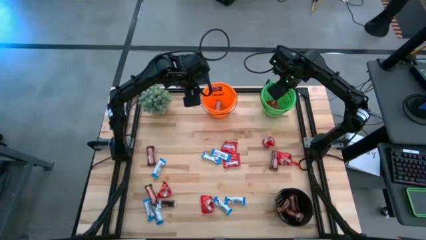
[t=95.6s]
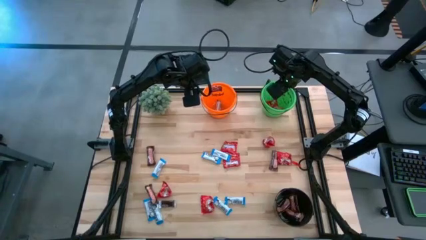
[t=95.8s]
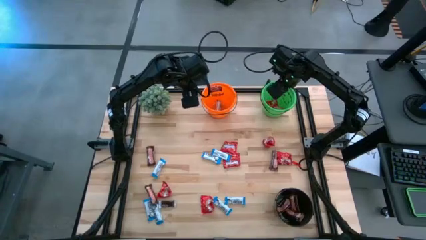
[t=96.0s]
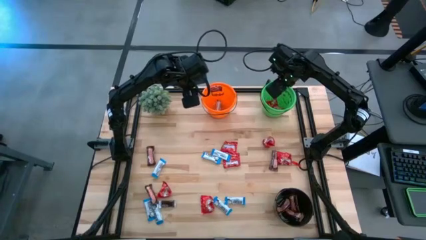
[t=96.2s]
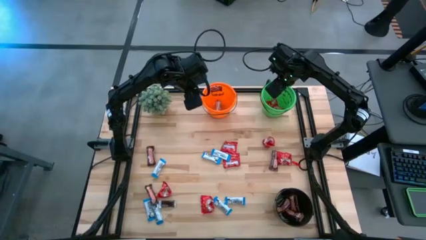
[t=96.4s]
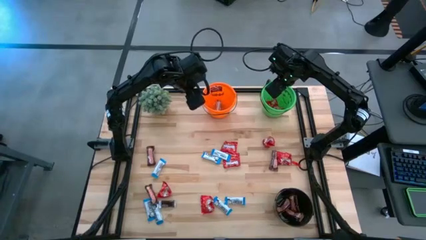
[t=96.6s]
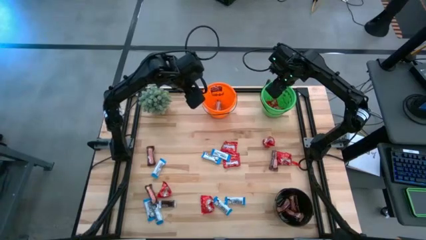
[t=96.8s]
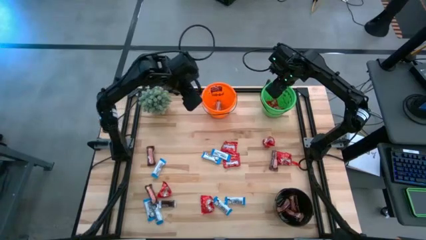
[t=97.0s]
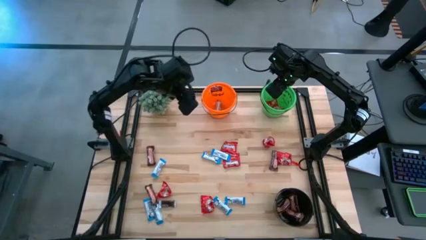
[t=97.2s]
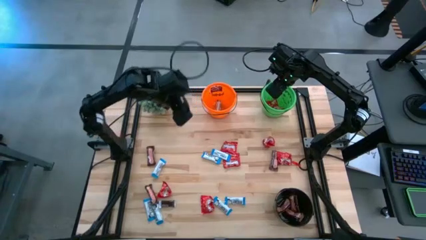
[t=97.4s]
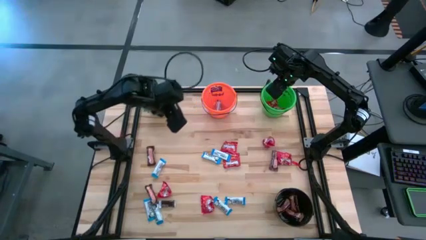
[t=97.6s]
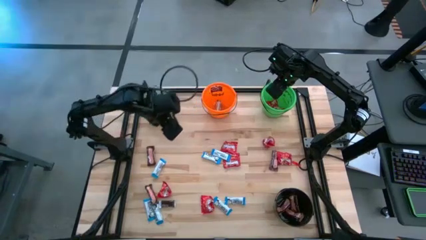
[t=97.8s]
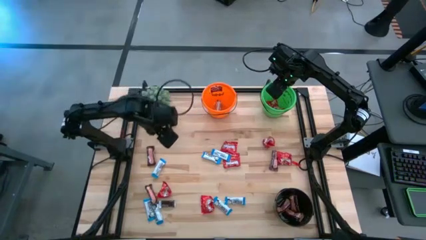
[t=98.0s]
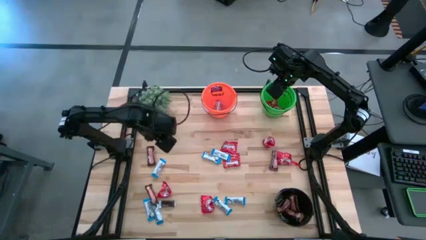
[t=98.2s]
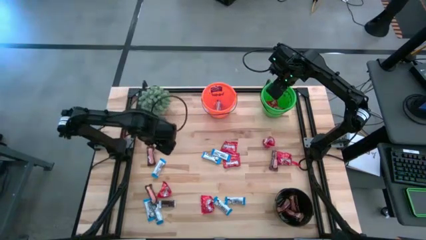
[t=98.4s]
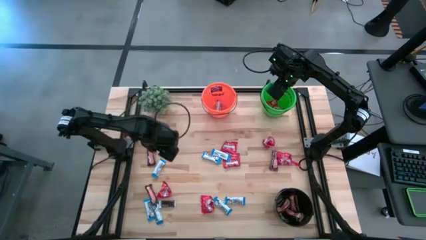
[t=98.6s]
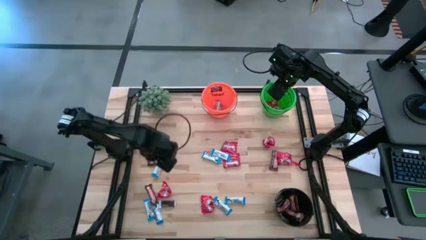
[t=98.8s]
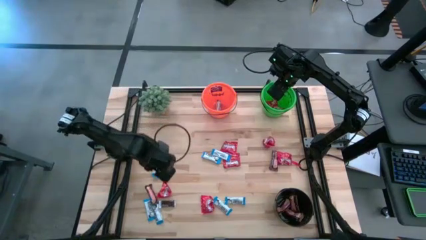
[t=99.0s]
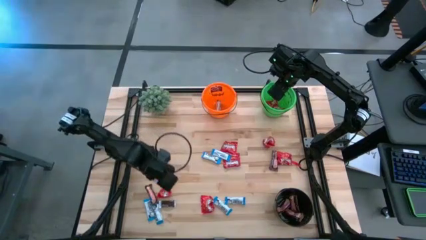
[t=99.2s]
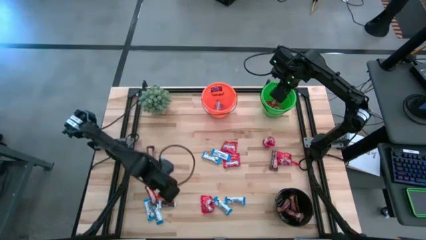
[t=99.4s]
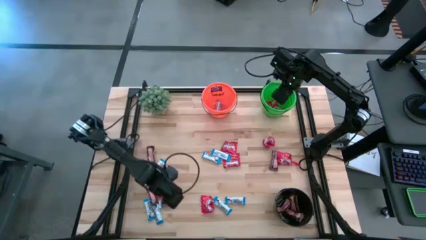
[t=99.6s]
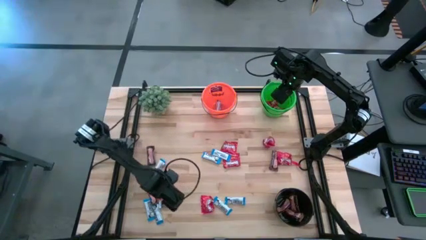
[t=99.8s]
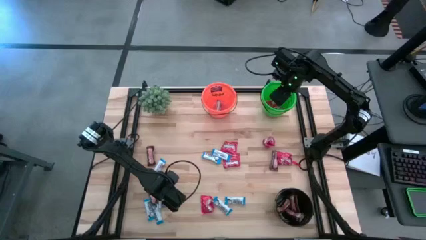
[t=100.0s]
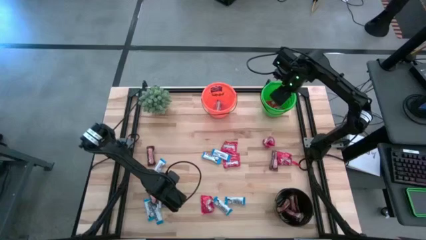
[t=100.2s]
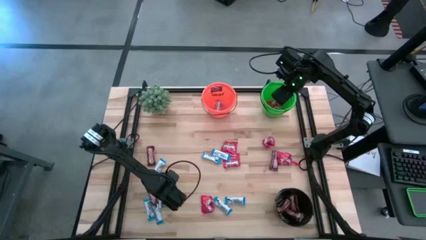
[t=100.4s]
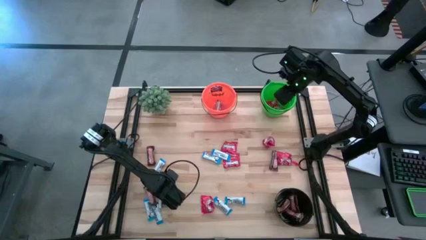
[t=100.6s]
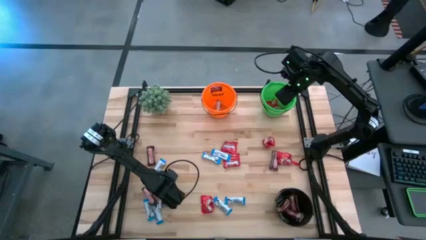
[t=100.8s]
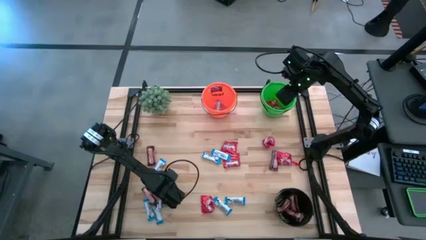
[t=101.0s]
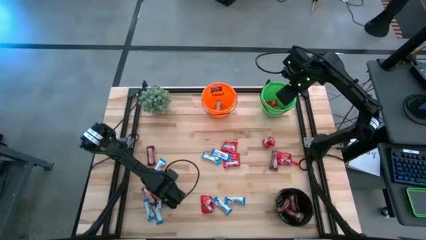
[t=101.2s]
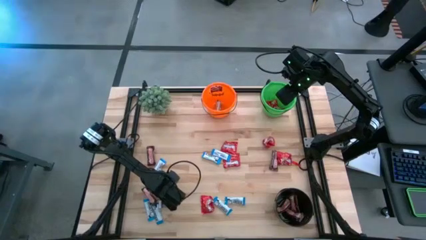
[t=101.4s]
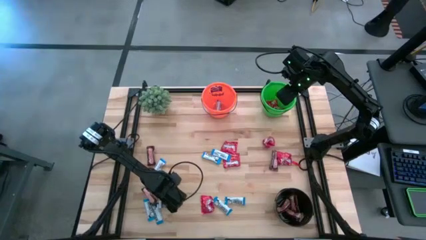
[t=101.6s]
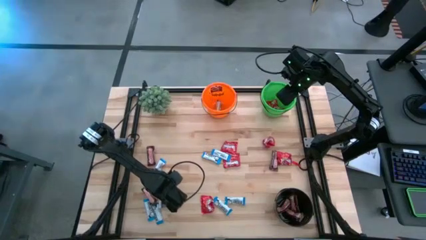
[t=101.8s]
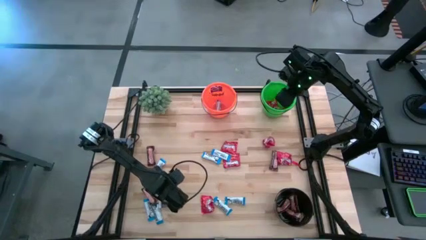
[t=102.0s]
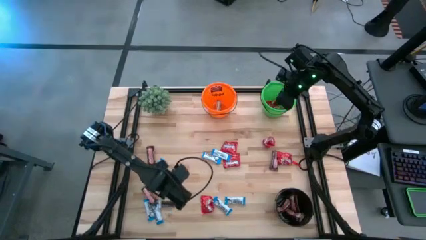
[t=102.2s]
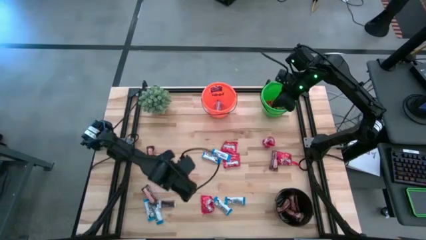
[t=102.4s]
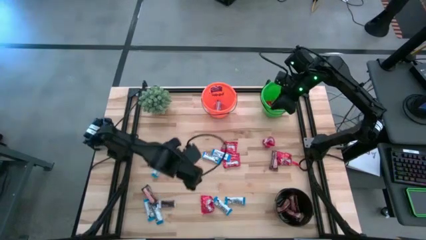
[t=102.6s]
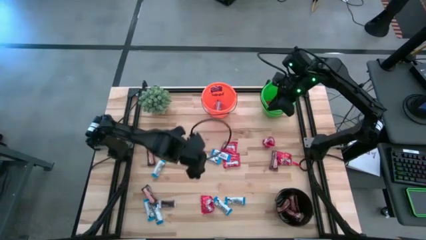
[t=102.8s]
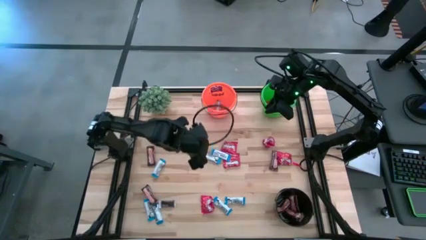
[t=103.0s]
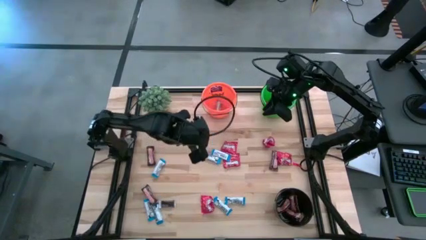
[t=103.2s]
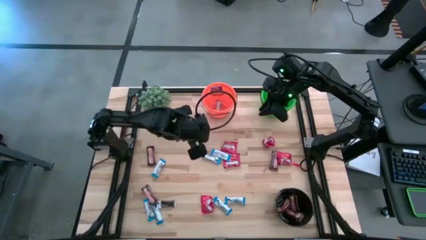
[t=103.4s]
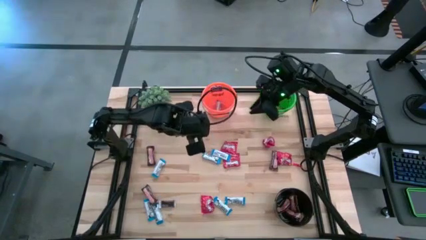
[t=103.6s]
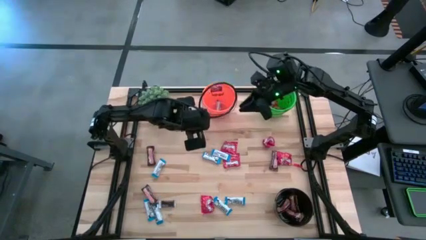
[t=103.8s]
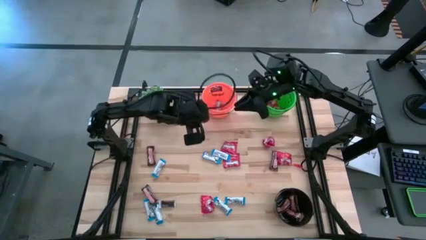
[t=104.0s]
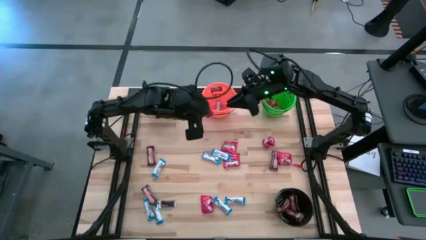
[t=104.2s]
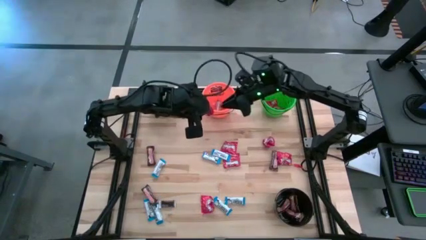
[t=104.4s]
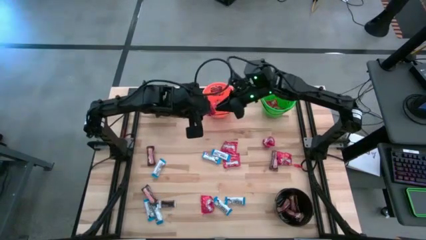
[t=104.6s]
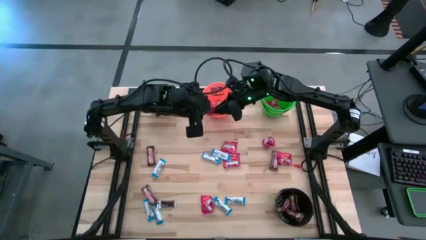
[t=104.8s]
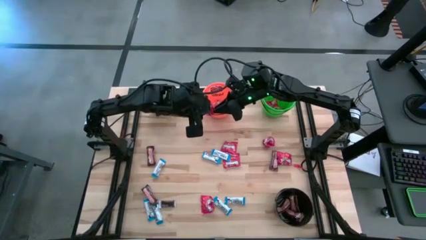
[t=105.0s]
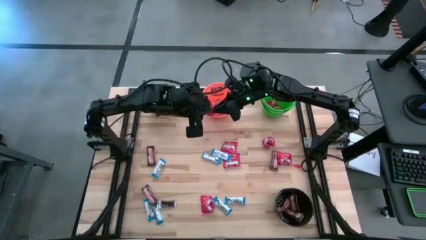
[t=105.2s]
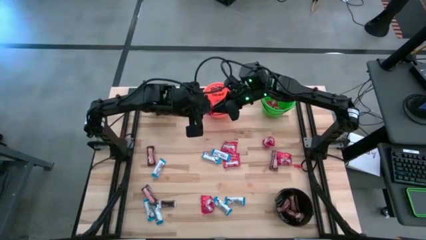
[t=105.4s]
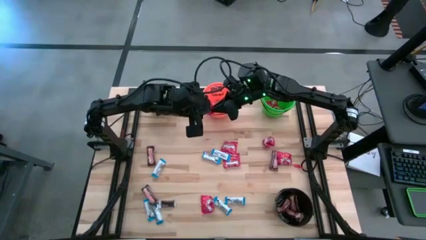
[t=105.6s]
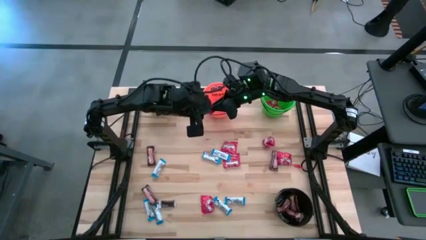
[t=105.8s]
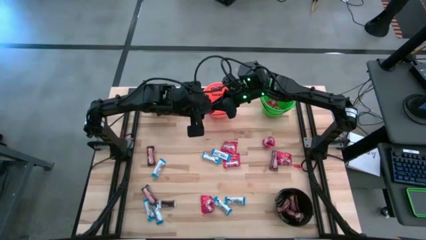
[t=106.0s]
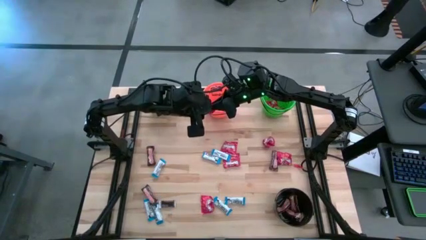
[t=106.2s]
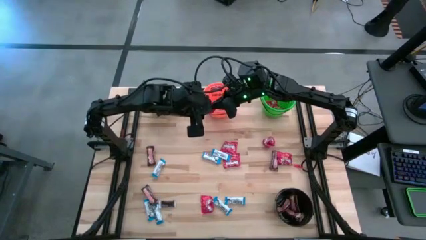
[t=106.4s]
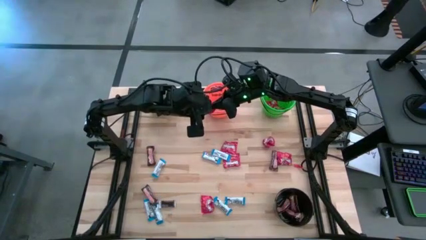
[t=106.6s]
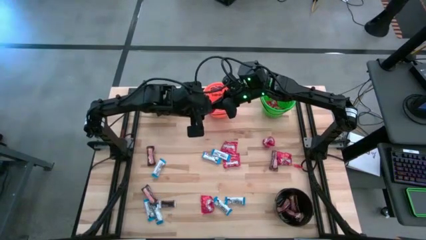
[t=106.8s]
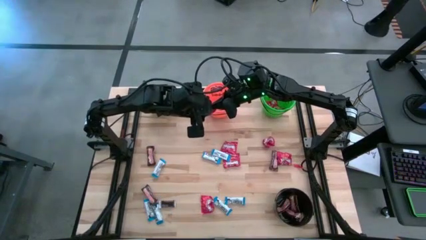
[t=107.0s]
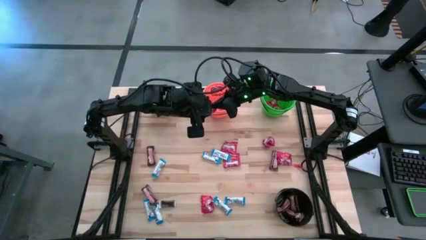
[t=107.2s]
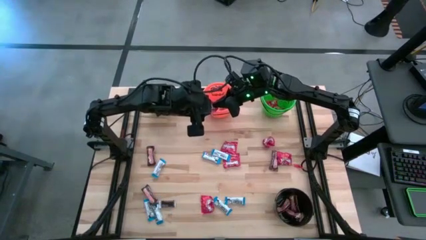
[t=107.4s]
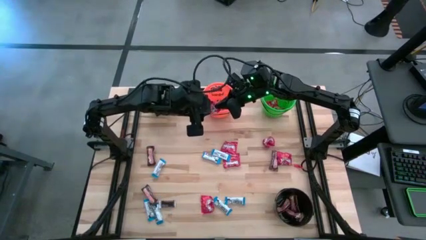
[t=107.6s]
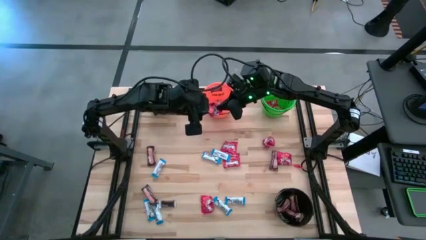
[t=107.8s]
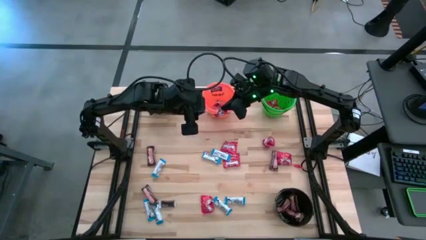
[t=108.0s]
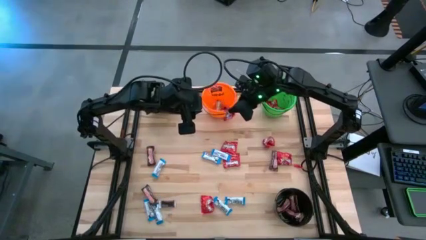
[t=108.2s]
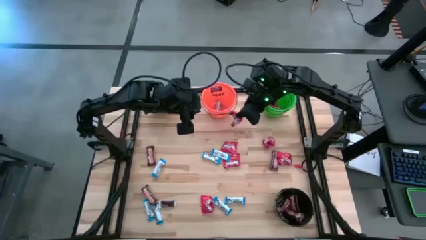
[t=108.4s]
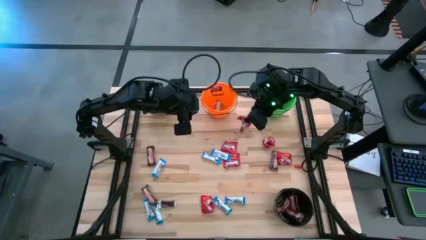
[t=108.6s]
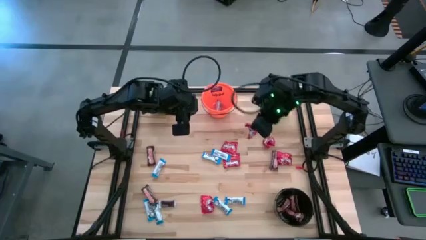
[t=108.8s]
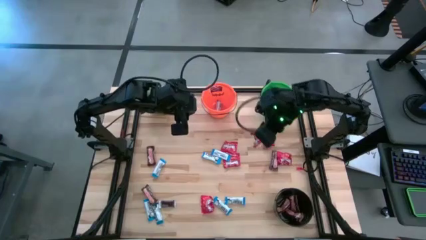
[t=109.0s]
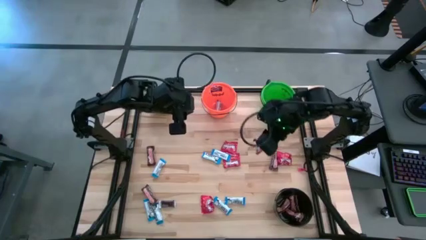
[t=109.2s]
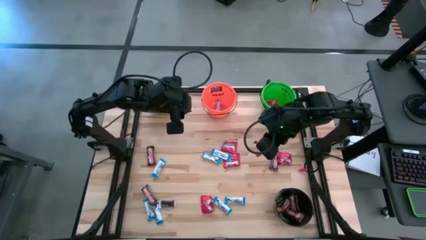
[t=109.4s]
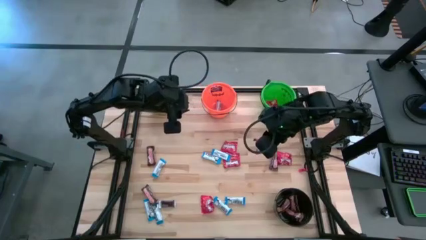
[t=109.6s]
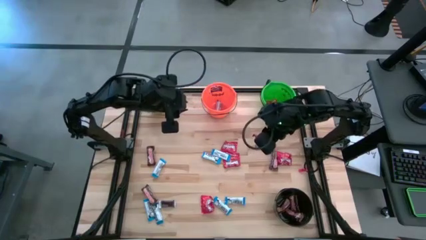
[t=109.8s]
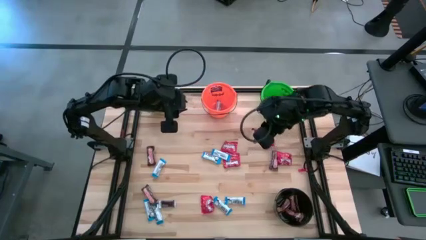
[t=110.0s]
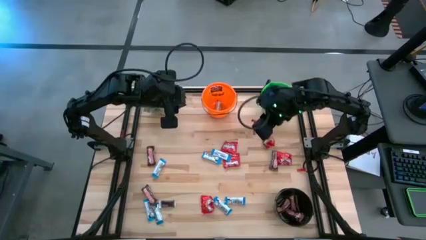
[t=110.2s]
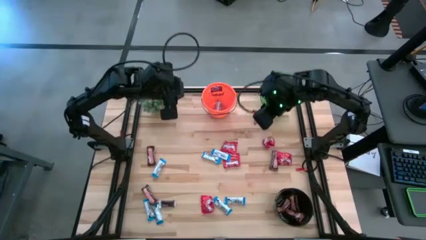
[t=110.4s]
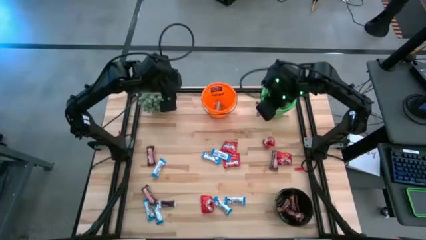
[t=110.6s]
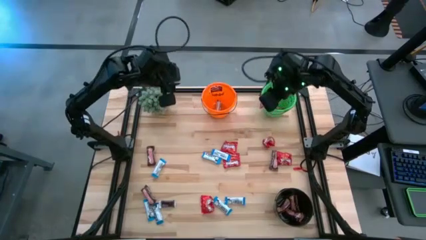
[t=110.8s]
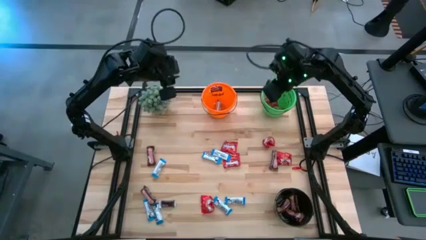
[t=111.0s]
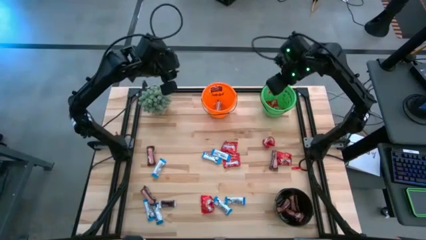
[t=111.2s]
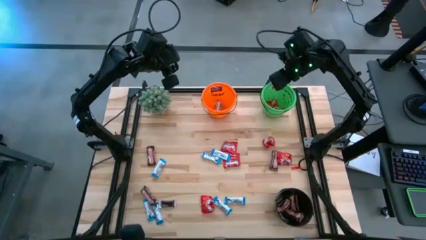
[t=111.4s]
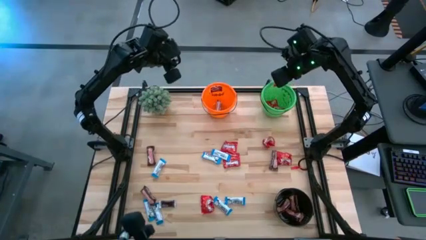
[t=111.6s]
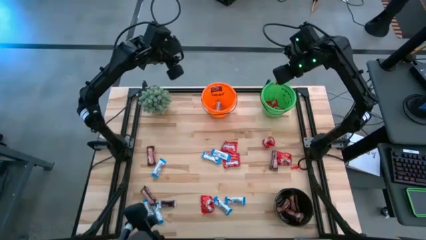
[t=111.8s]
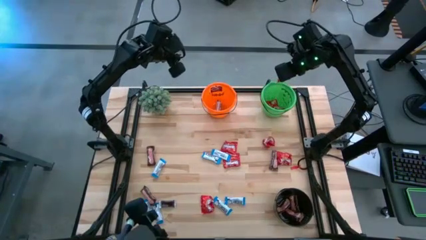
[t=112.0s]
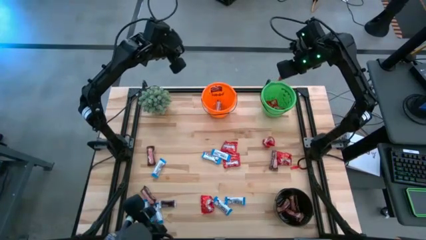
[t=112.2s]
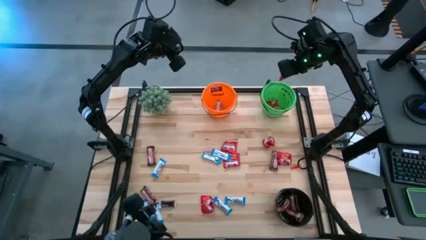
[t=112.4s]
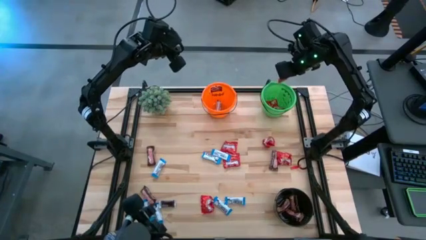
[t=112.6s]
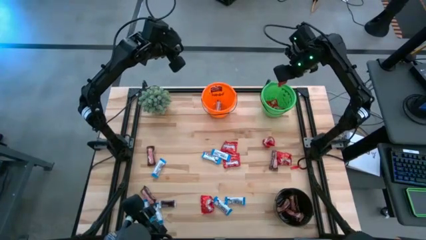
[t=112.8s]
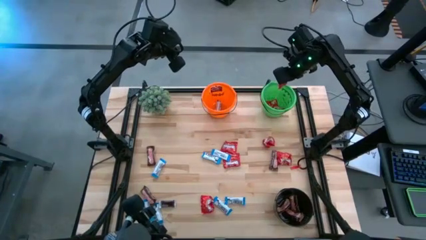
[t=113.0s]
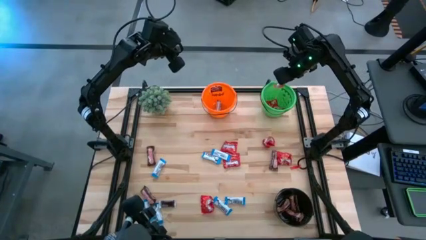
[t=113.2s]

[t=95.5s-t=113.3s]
Task: Organize candy in baskets
Put the red candy into the green bucket
